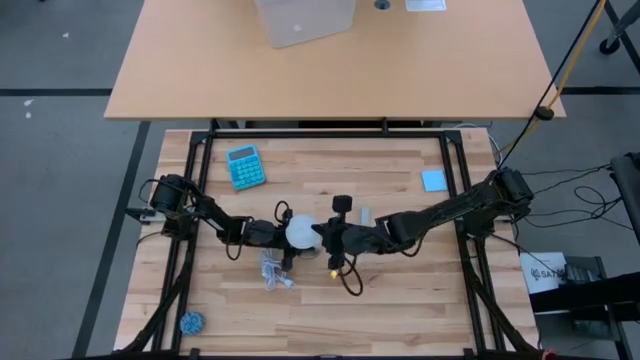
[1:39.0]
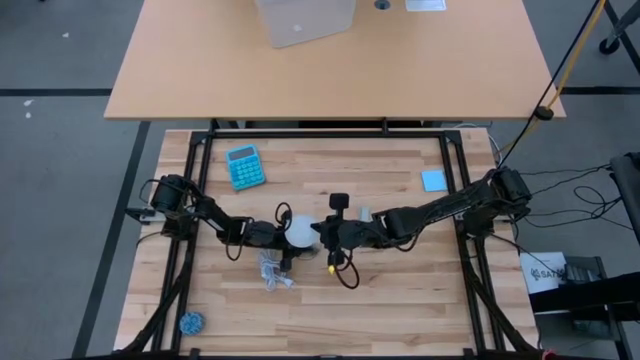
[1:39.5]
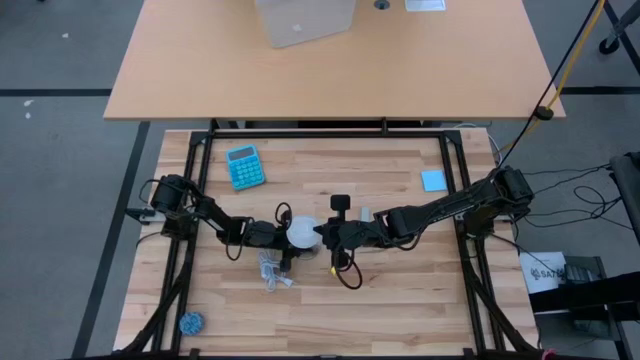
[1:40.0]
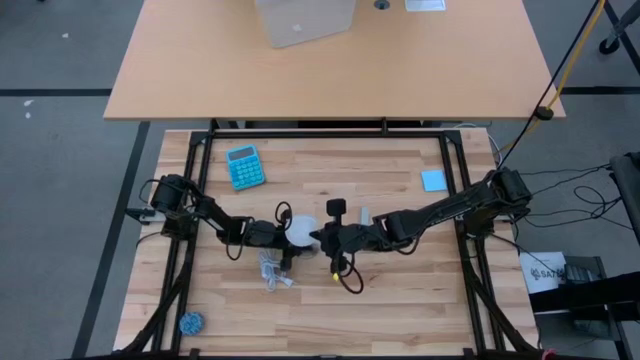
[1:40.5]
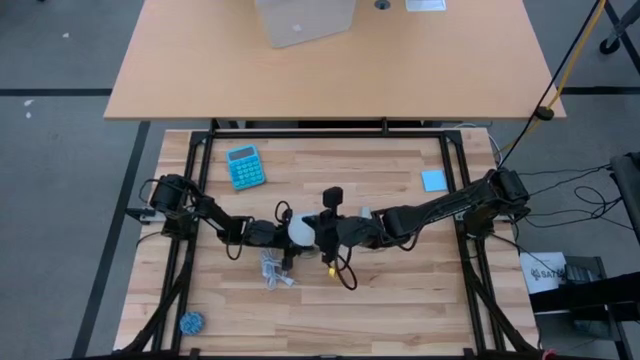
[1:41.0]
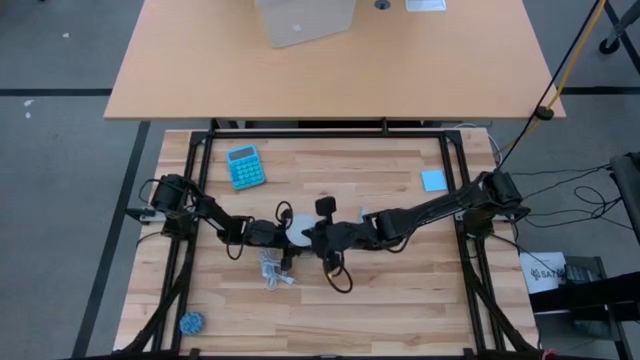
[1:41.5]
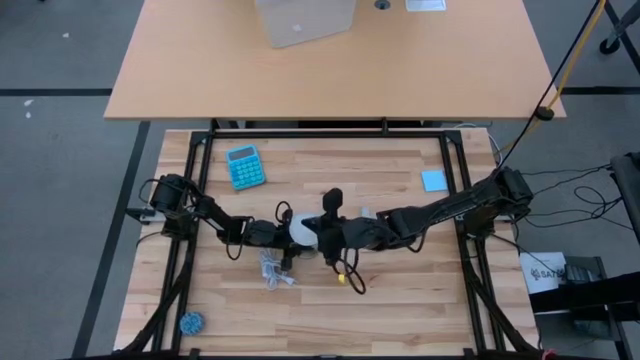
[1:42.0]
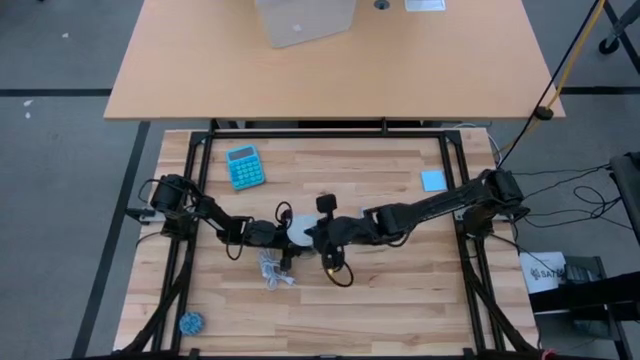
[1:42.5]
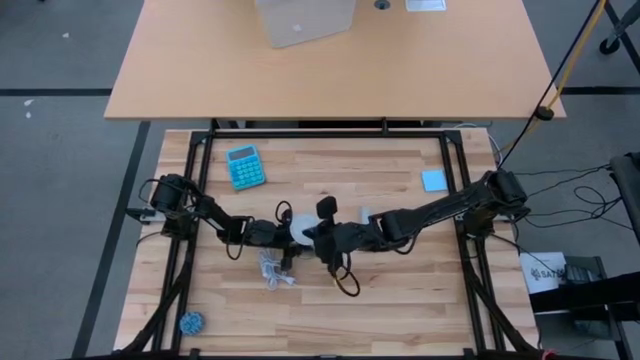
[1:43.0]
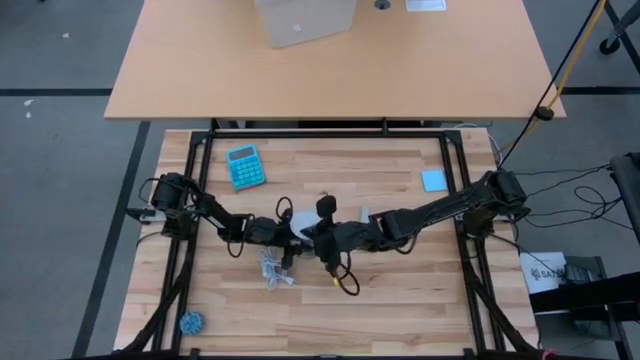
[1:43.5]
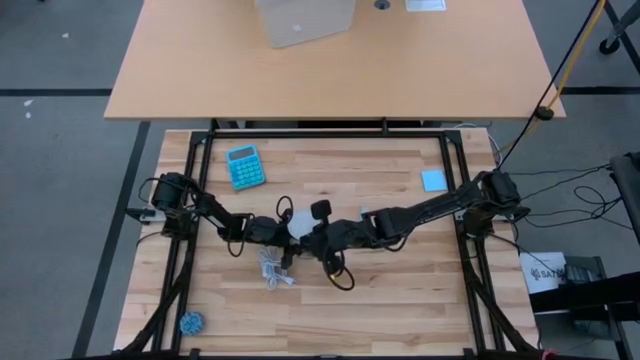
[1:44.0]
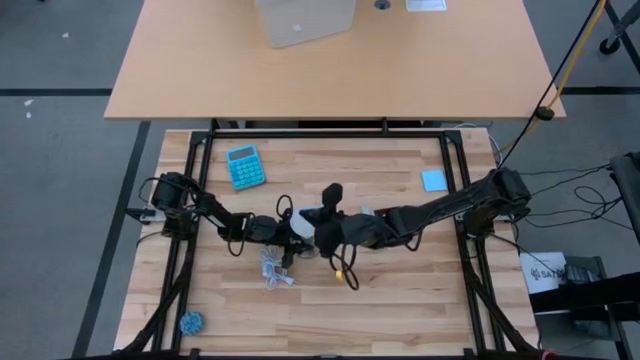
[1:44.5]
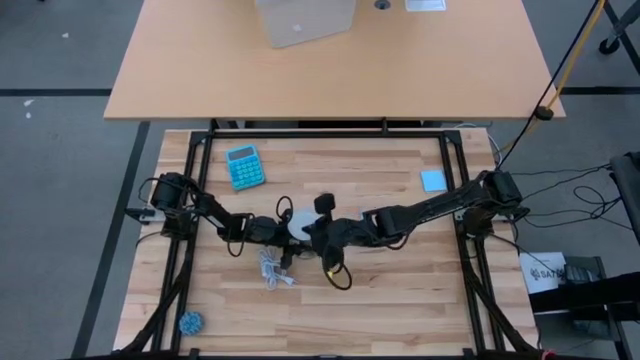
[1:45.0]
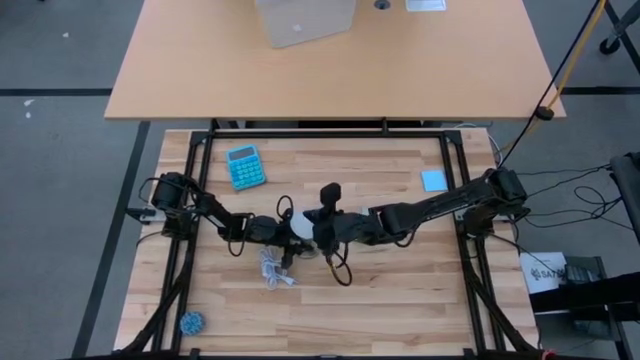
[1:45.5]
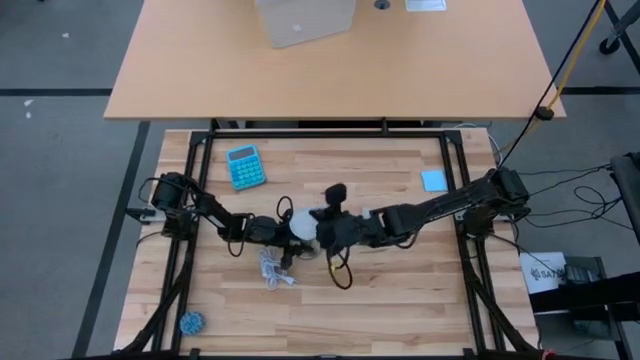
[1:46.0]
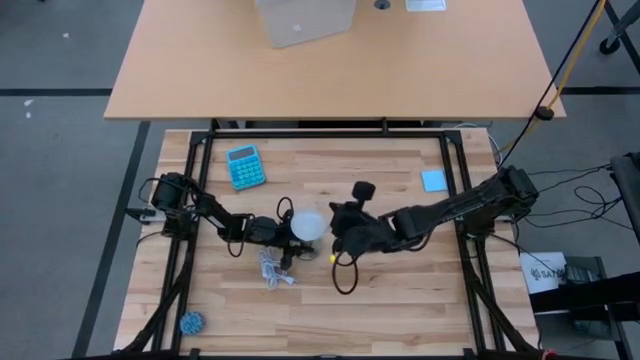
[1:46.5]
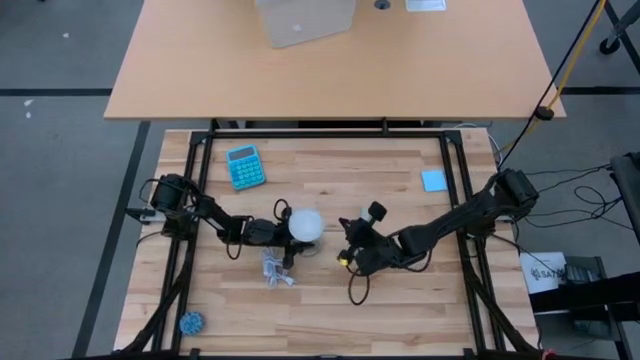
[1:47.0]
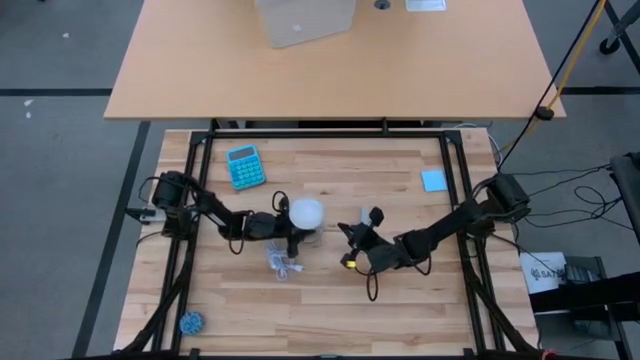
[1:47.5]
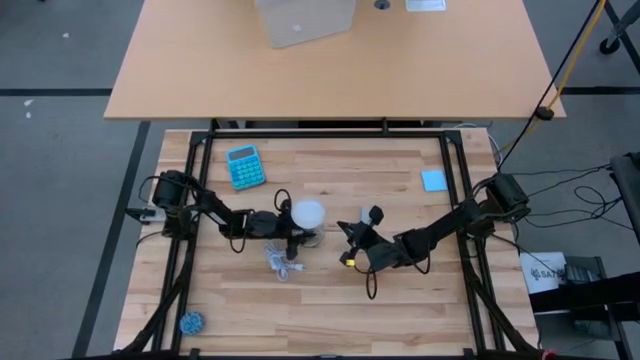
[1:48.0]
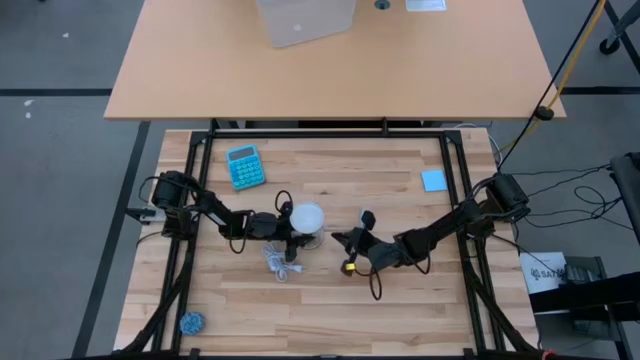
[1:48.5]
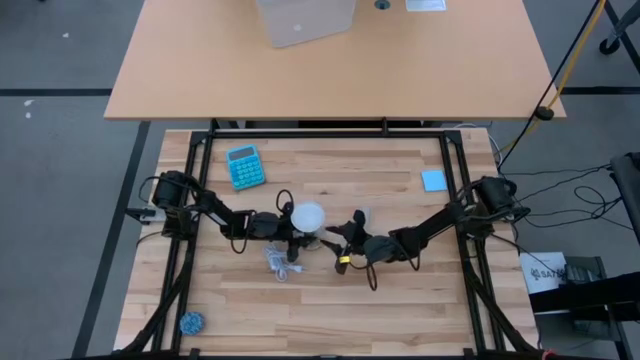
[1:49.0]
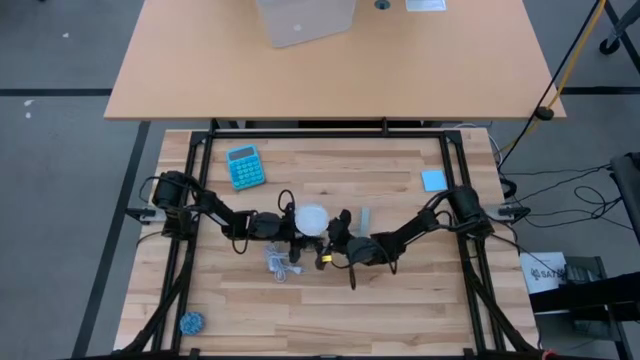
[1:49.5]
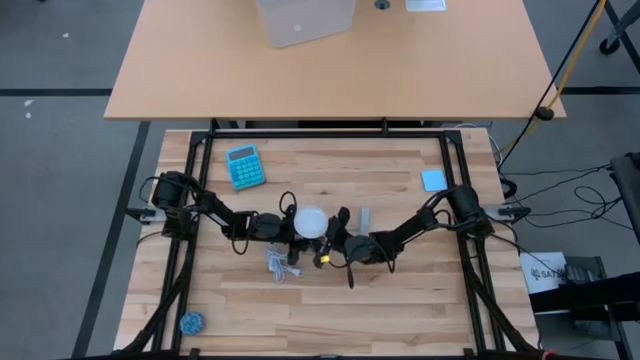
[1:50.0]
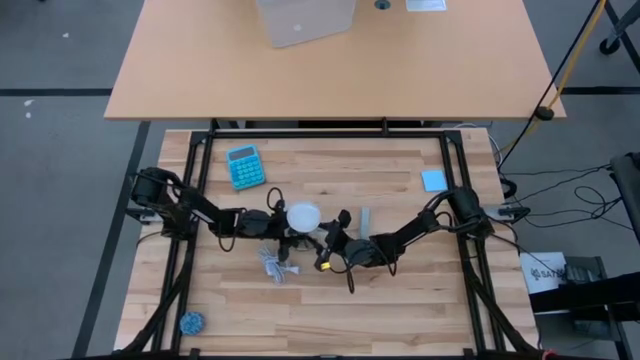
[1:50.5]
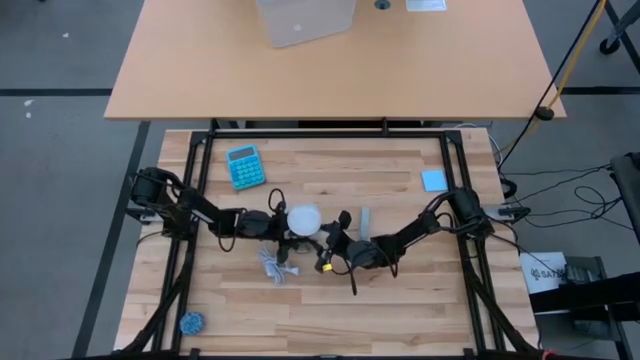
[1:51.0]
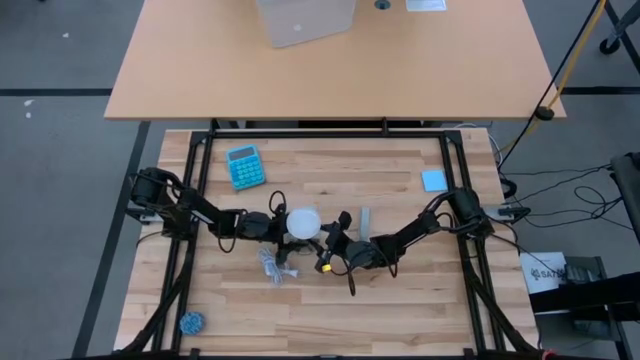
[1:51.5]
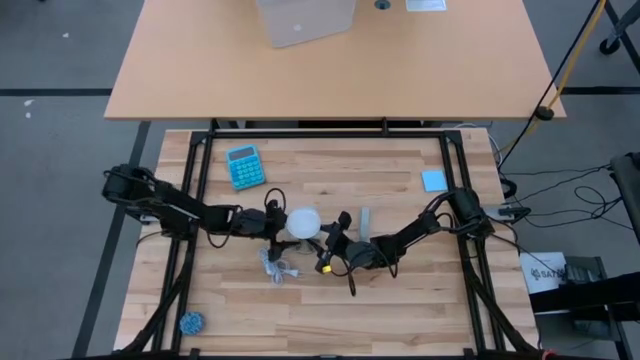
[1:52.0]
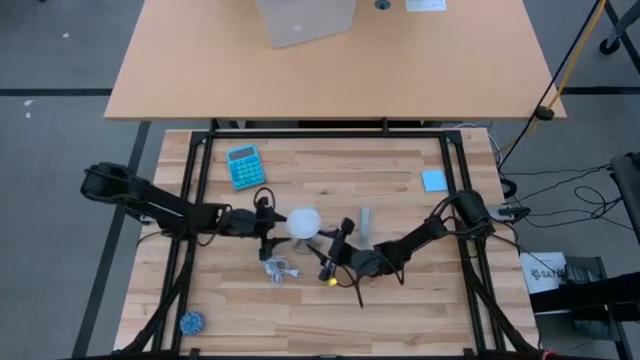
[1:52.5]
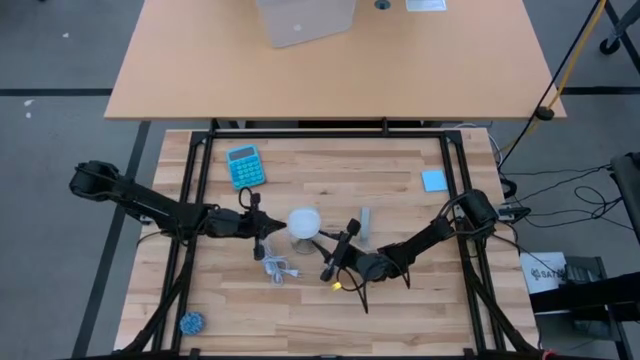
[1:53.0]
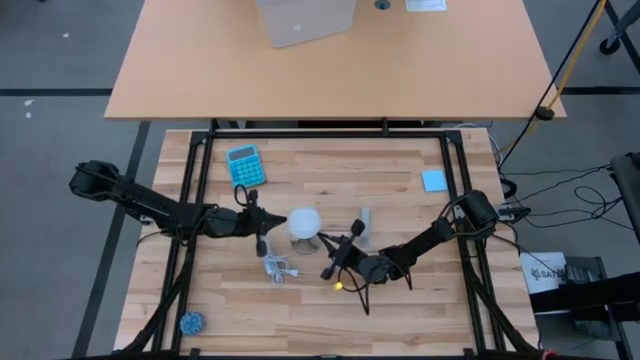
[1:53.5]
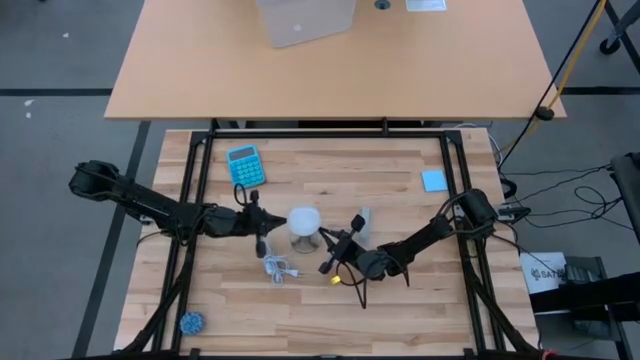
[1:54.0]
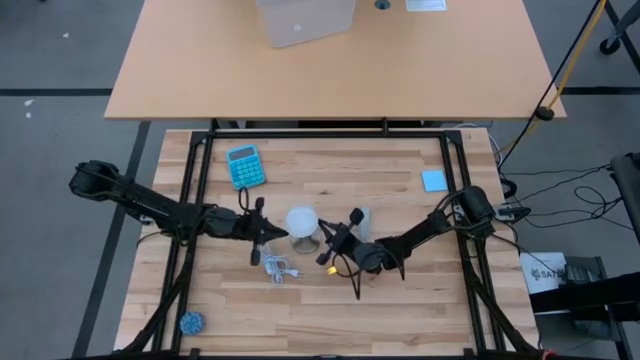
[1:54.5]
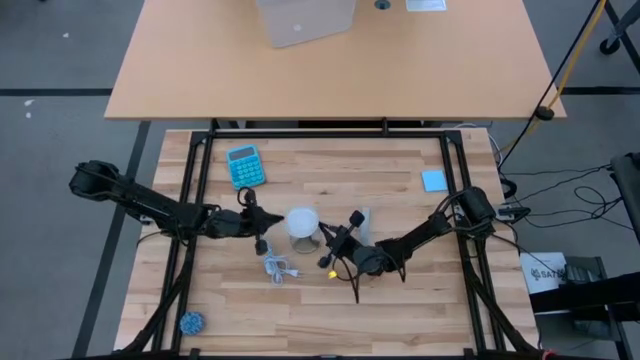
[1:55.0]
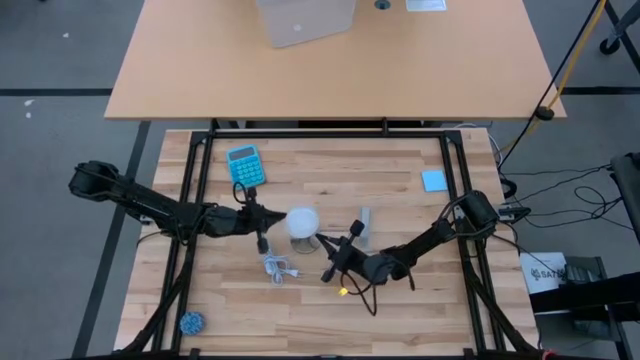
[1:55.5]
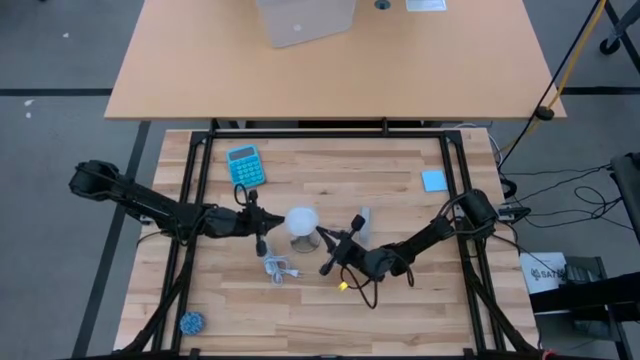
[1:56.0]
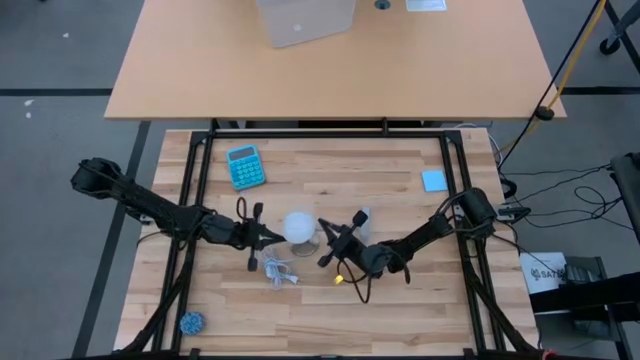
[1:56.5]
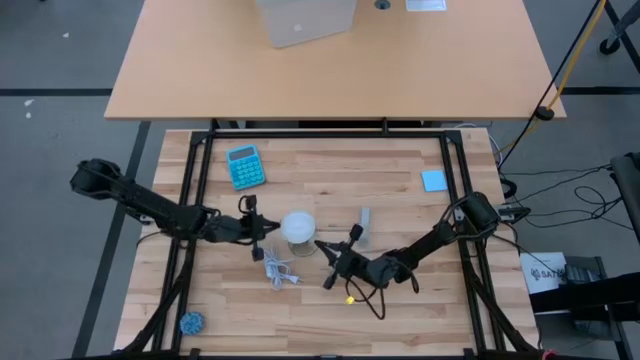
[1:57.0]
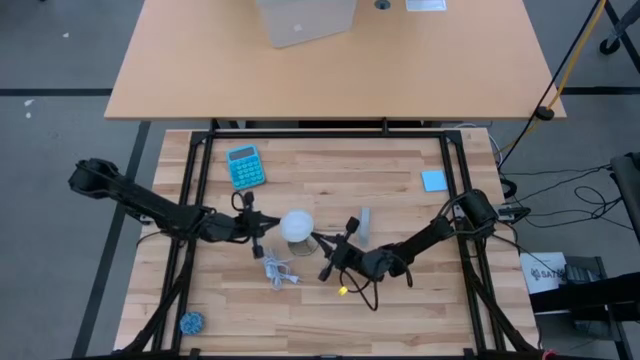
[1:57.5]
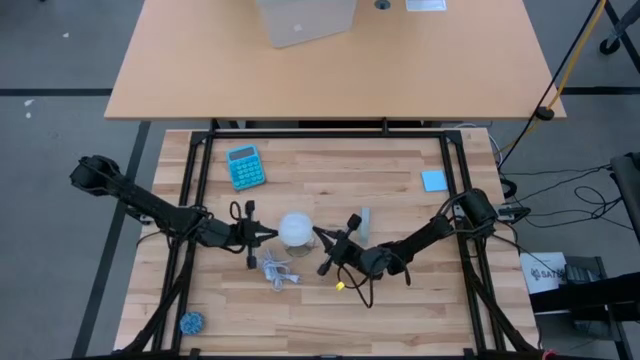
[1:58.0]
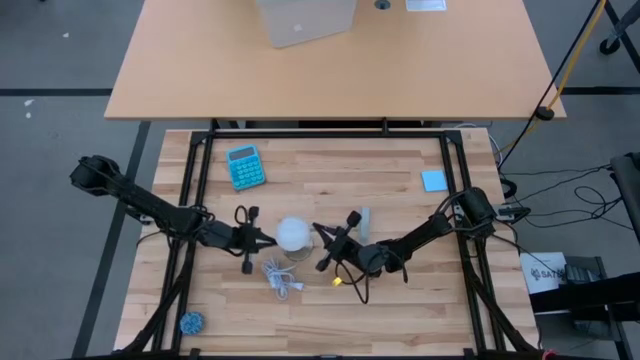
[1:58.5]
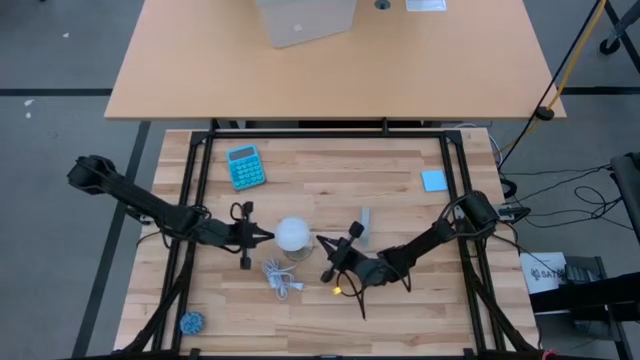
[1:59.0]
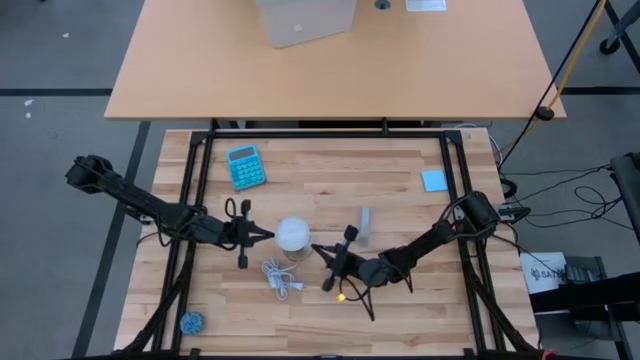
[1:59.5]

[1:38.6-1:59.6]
Task: Screw lightbulb
Remove the light bulb from the lamp
